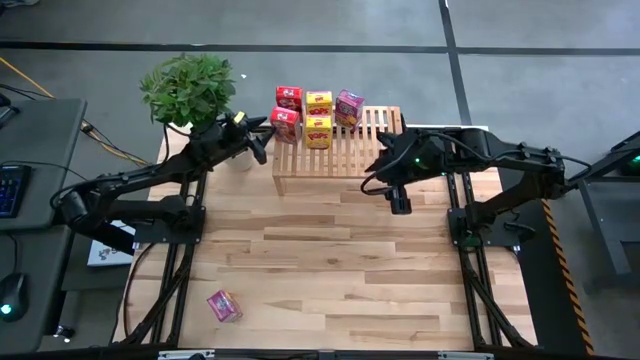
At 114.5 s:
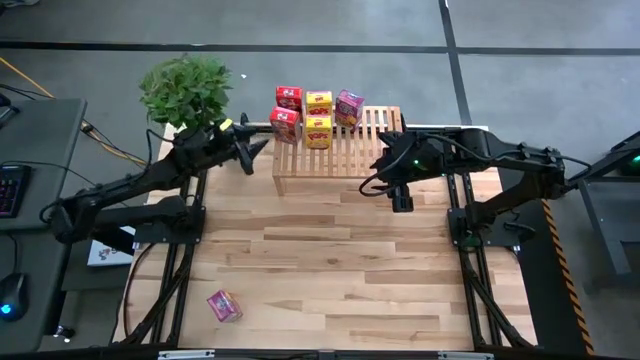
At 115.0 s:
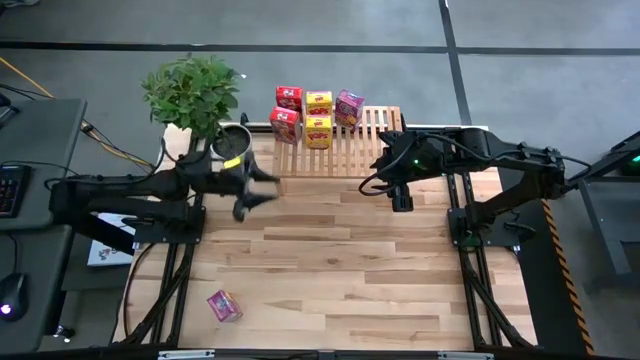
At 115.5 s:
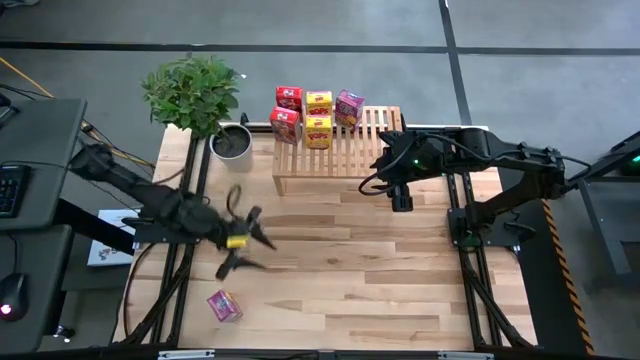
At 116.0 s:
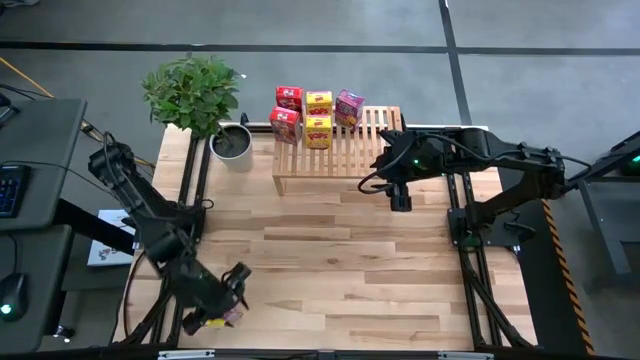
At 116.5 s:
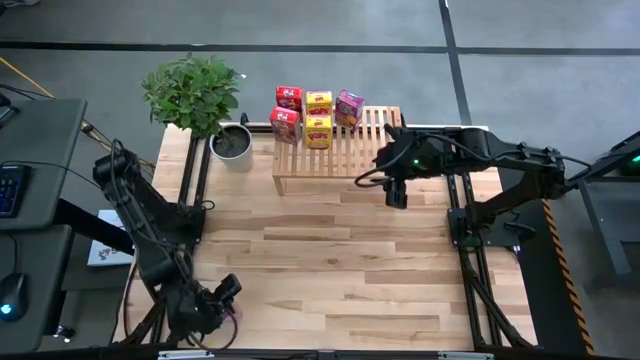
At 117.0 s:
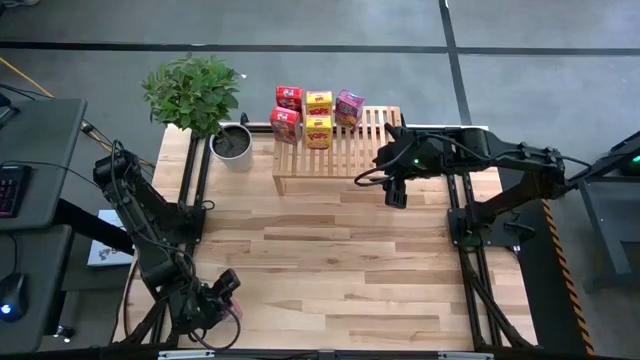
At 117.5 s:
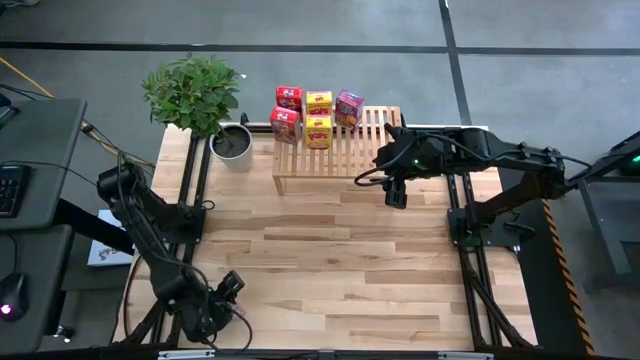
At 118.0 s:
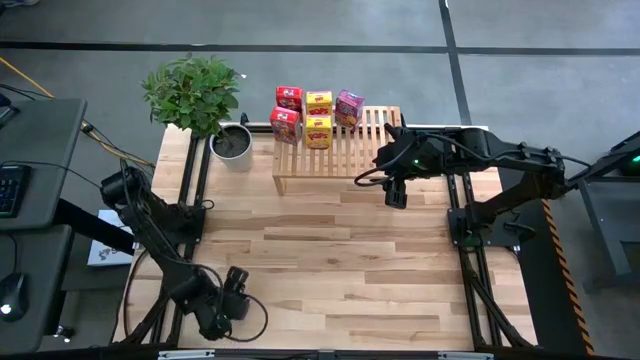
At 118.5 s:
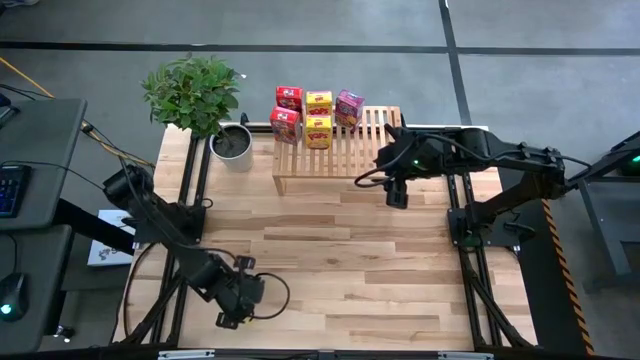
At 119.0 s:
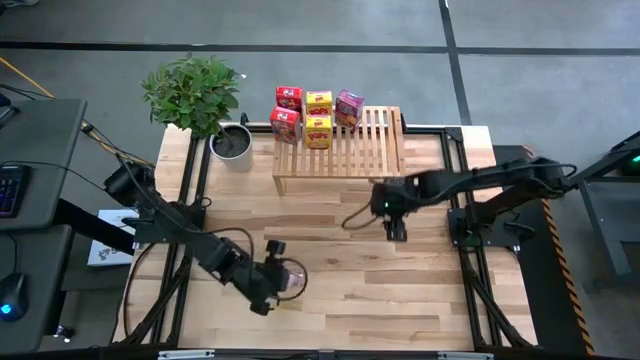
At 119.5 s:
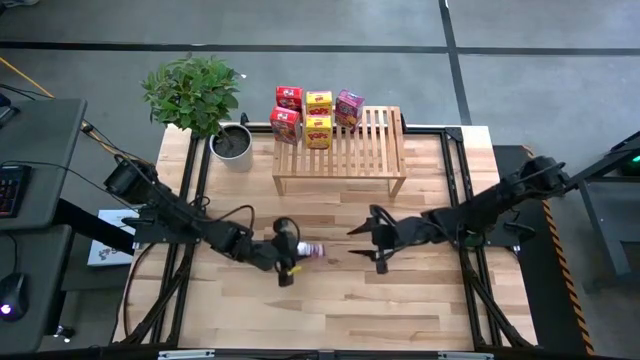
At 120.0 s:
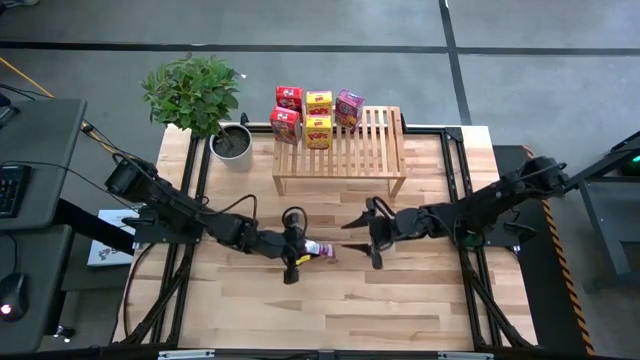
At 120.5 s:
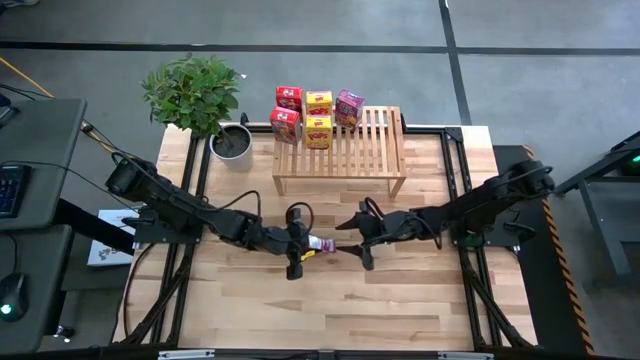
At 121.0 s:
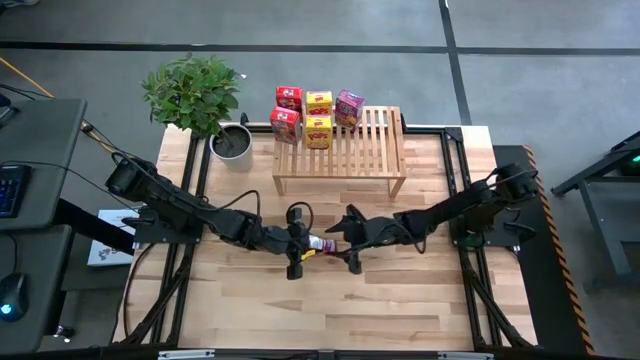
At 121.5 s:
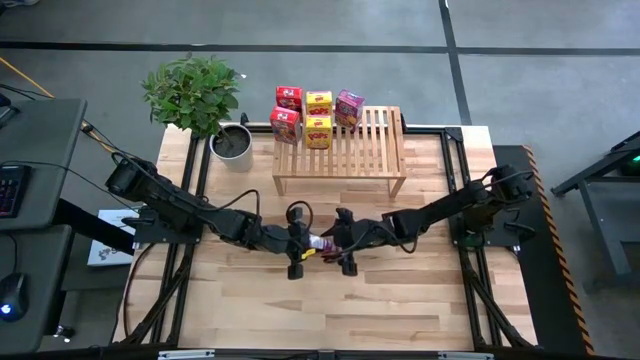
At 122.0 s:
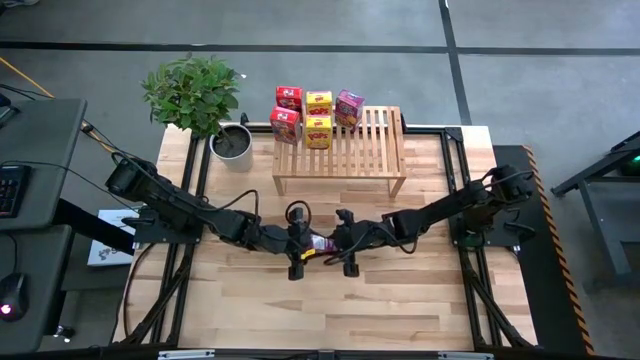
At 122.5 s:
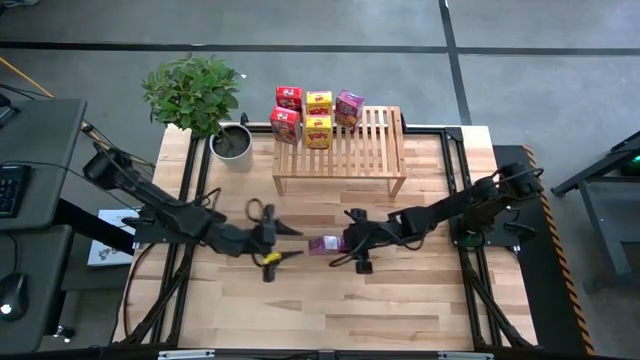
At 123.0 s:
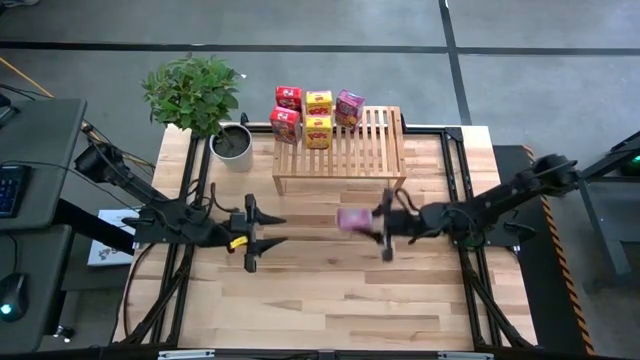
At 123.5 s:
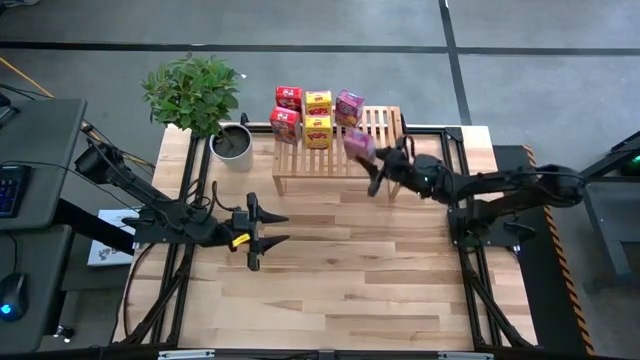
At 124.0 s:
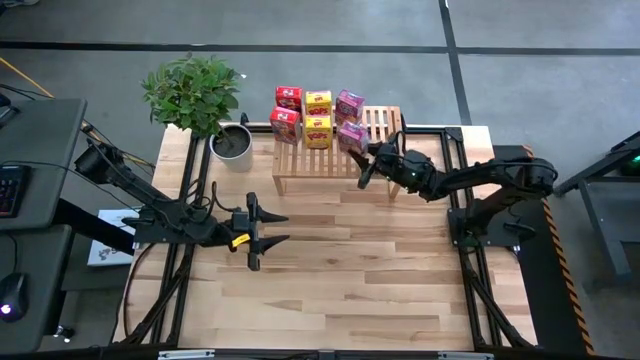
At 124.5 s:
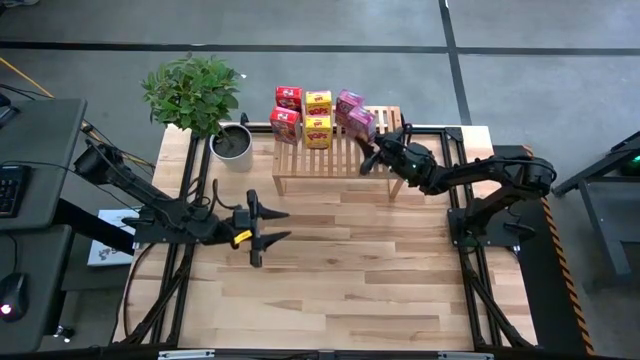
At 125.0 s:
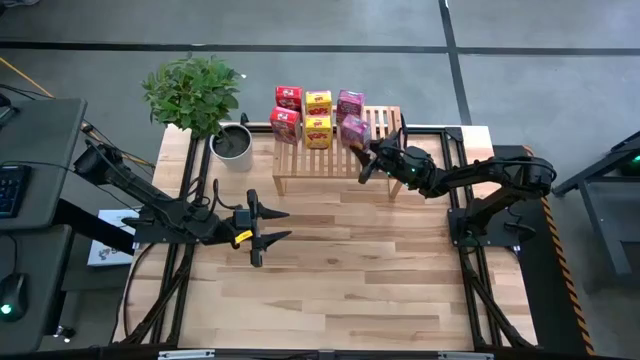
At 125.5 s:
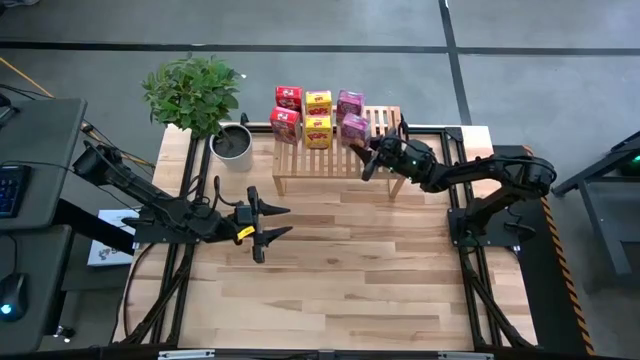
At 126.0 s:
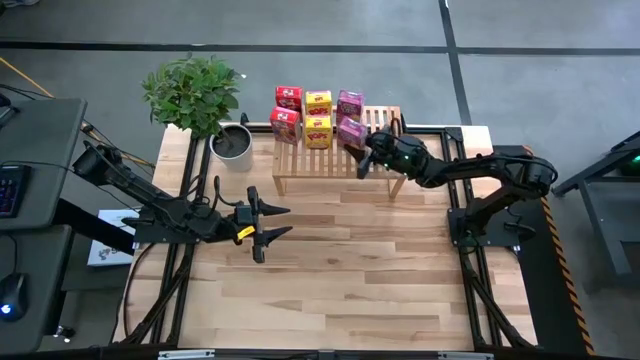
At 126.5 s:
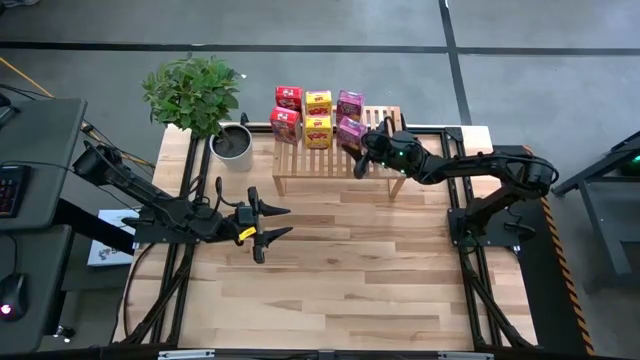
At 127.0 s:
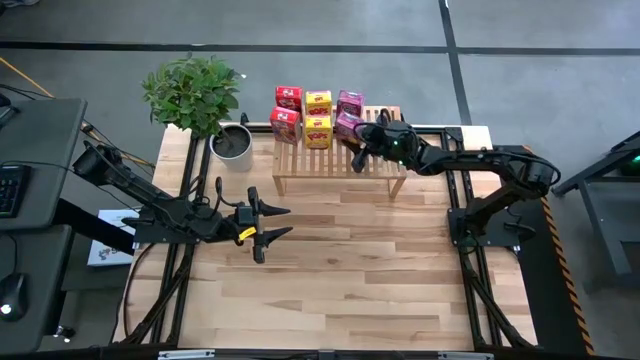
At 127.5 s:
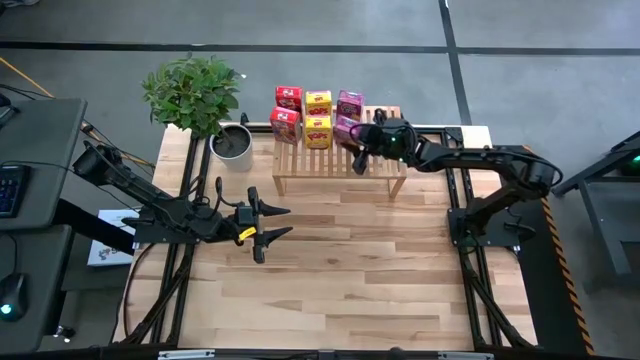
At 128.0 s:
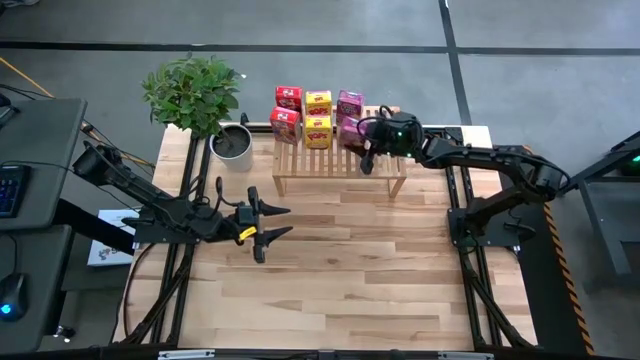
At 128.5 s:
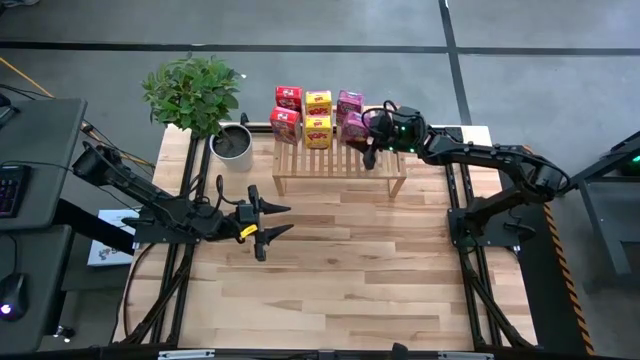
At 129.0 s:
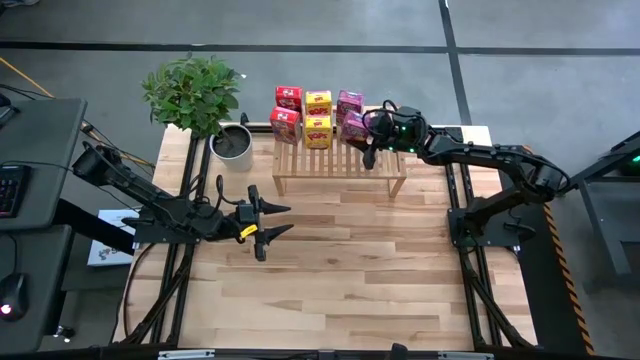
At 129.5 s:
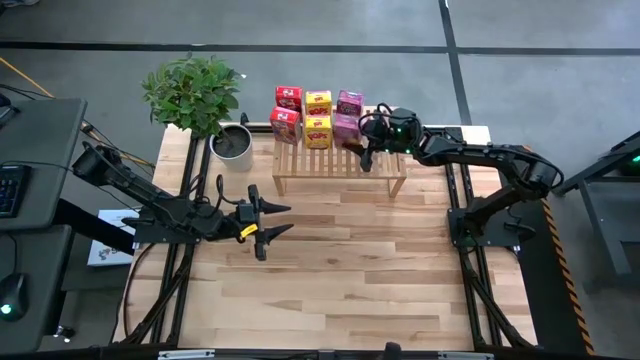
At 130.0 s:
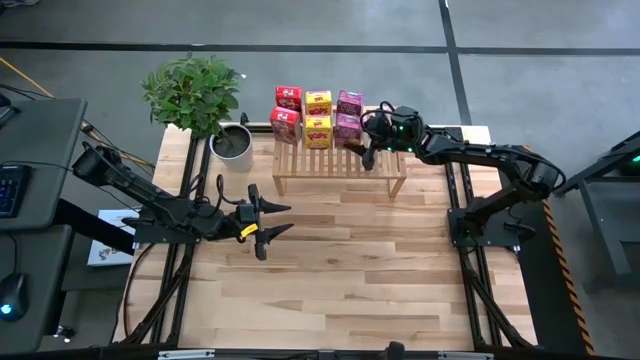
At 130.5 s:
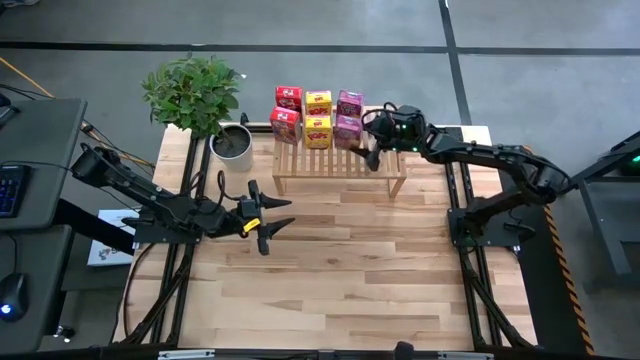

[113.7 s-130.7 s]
Task: Stack cereal on shelf
Align the violet cereal box with the other violet cereal box on the shelf

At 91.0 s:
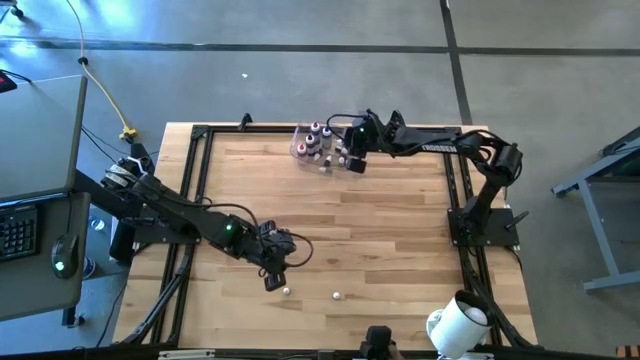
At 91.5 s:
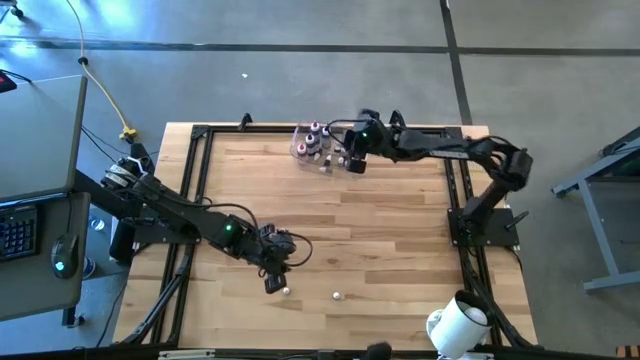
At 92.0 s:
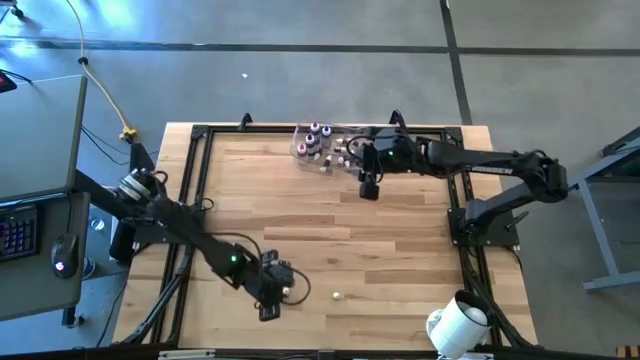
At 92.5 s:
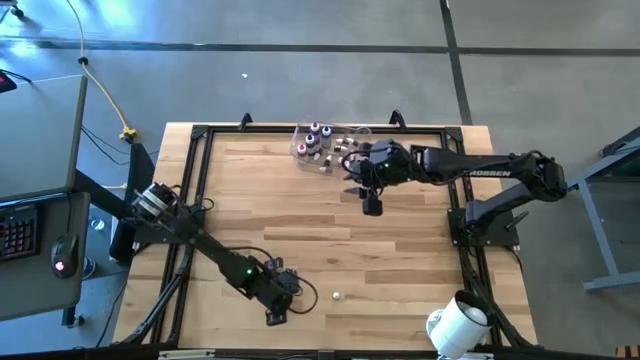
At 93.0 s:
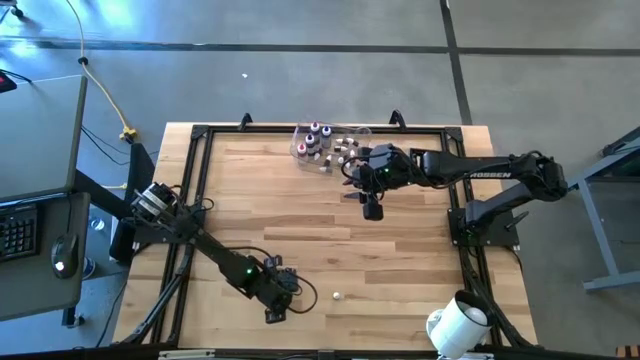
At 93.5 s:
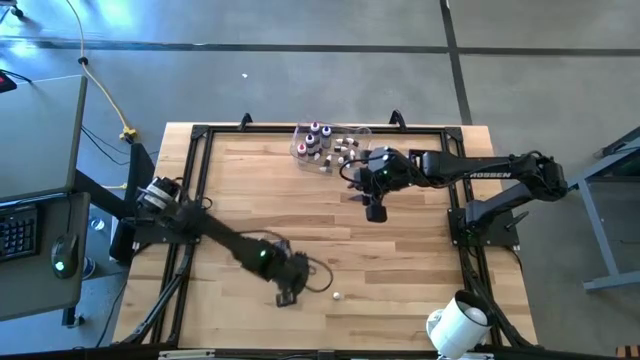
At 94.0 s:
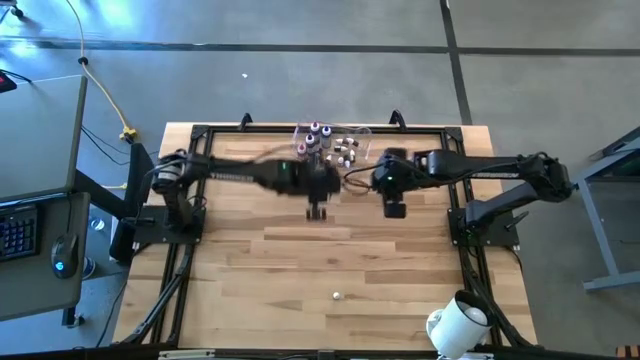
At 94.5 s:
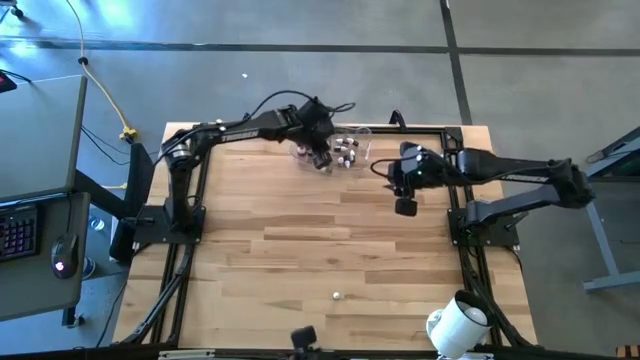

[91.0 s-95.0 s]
Task: Pick & Place food coloring
Put the red food coloring into the transparent bin

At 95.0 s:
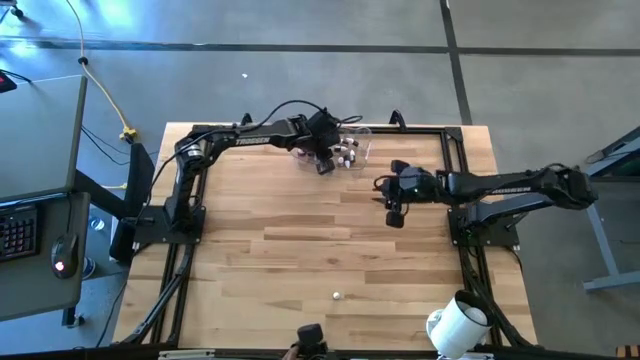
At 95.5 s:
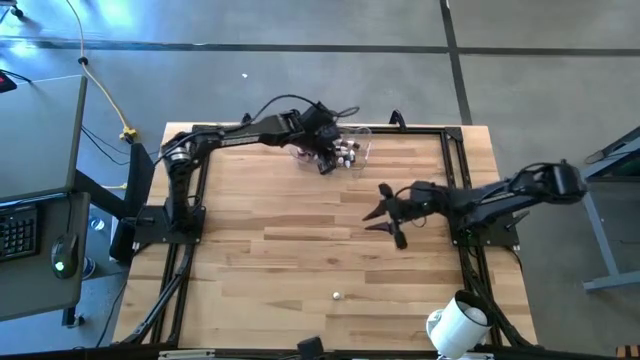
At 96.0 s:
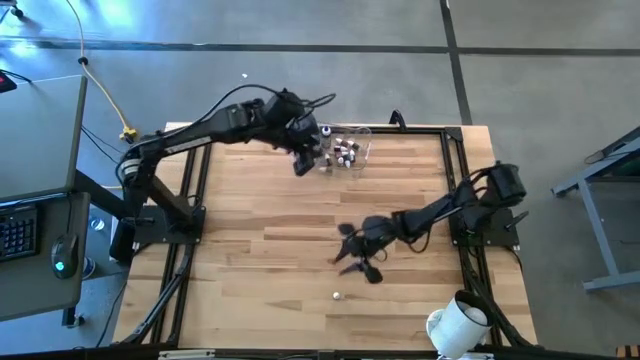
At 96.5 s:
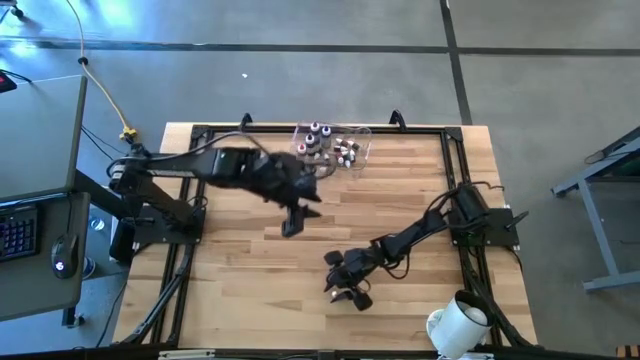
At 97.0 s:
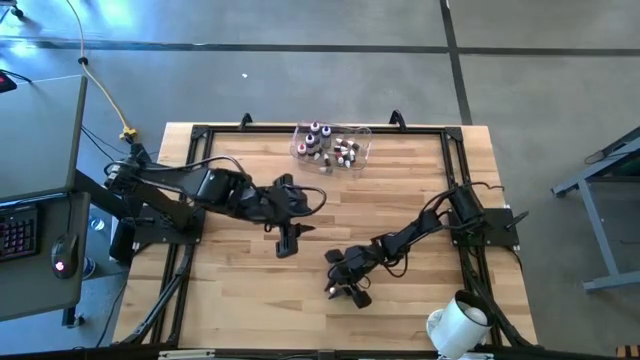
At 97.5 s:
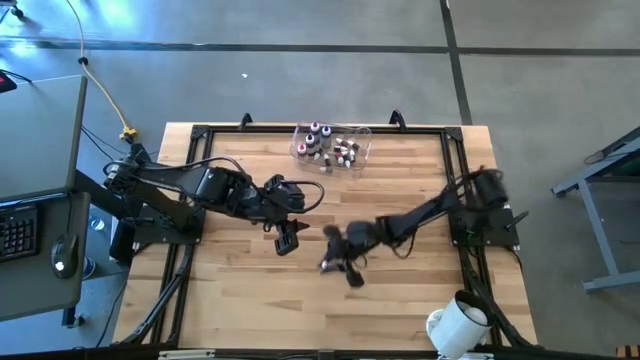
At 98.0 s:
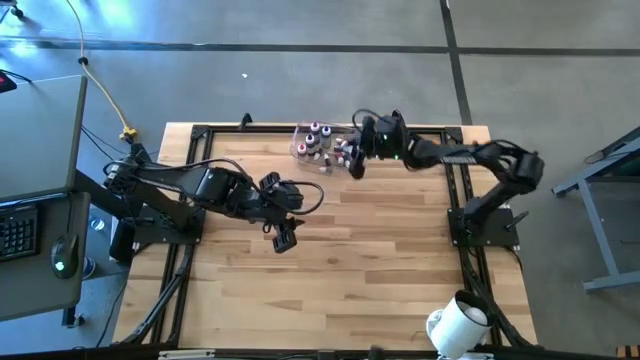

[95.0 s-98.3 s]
Put the food coloring into the transparent bin
